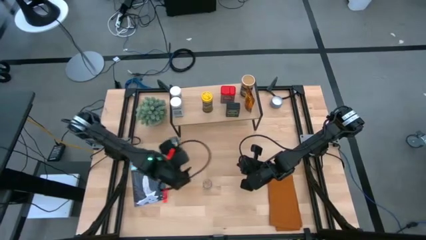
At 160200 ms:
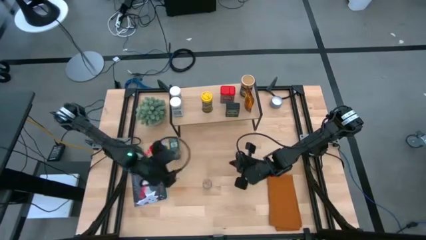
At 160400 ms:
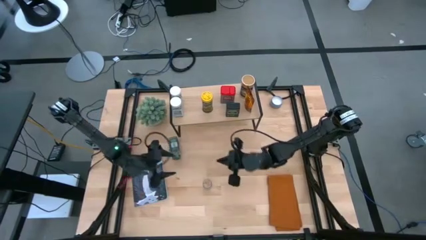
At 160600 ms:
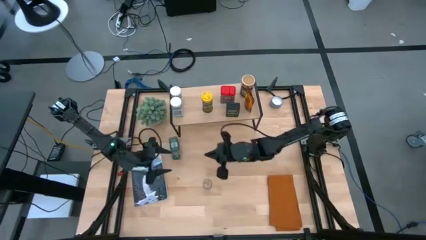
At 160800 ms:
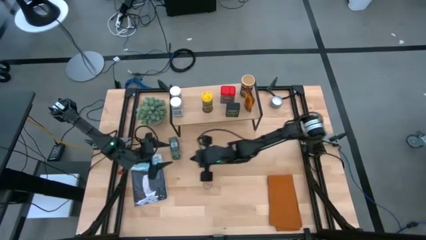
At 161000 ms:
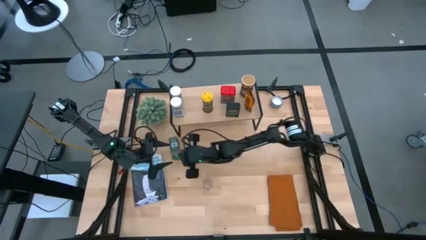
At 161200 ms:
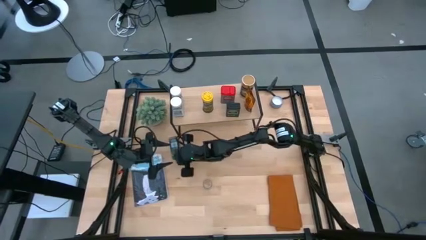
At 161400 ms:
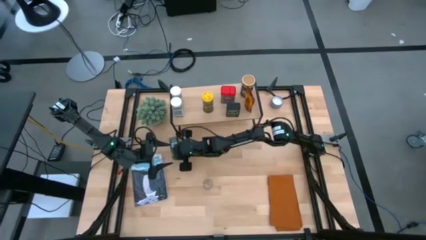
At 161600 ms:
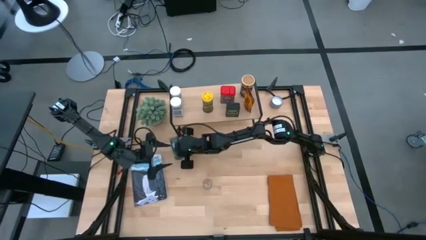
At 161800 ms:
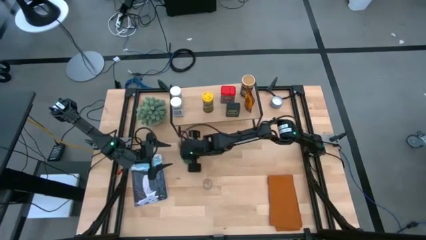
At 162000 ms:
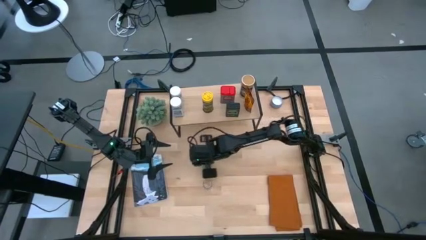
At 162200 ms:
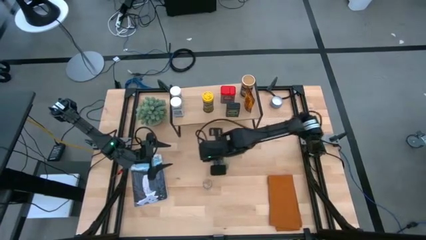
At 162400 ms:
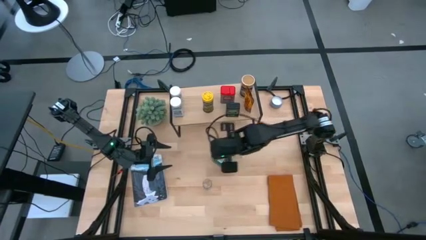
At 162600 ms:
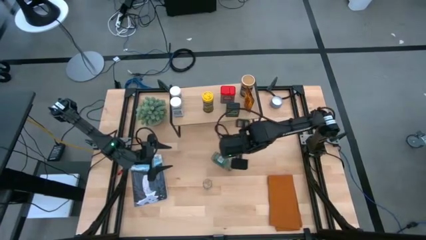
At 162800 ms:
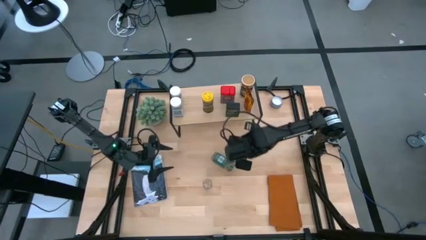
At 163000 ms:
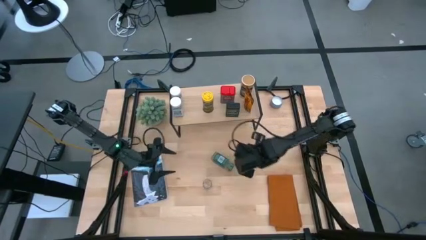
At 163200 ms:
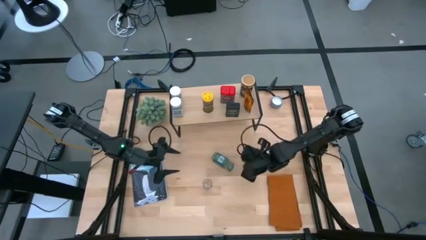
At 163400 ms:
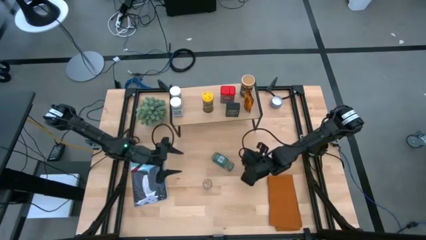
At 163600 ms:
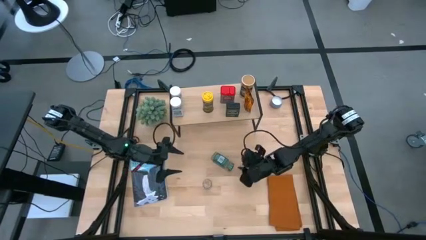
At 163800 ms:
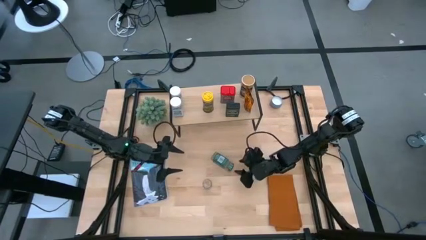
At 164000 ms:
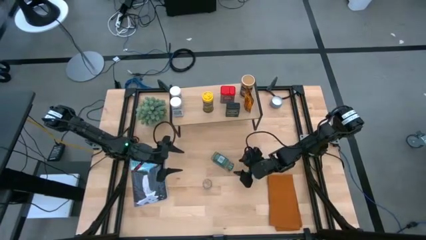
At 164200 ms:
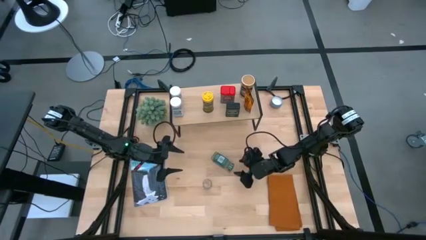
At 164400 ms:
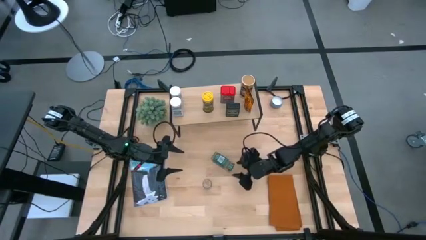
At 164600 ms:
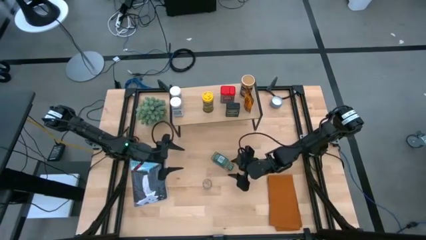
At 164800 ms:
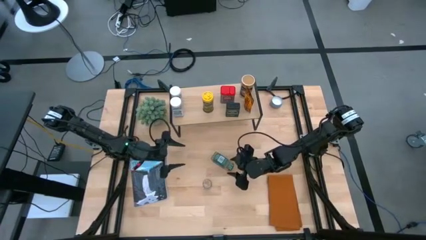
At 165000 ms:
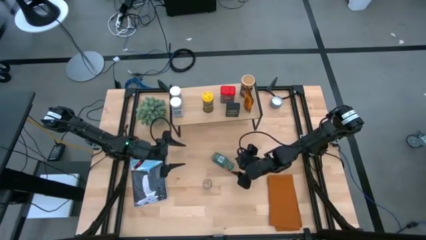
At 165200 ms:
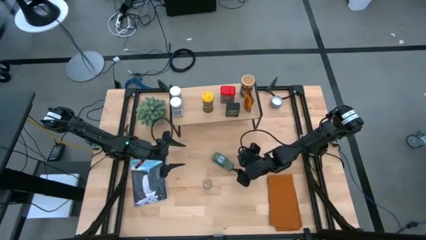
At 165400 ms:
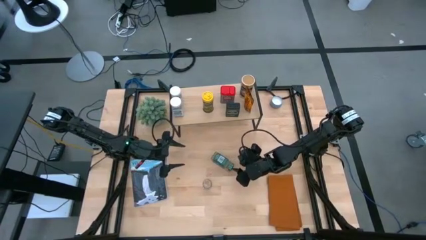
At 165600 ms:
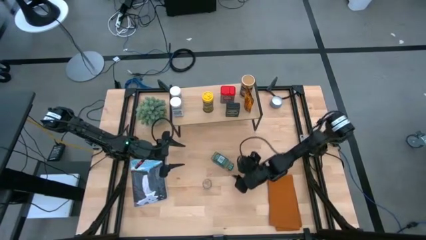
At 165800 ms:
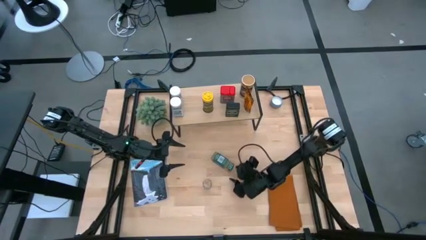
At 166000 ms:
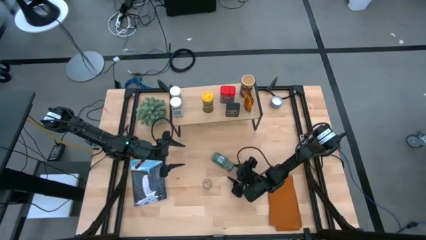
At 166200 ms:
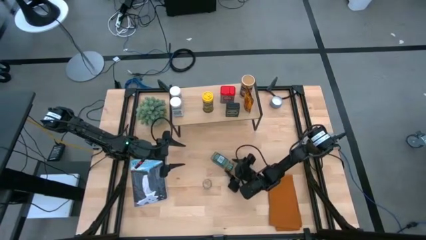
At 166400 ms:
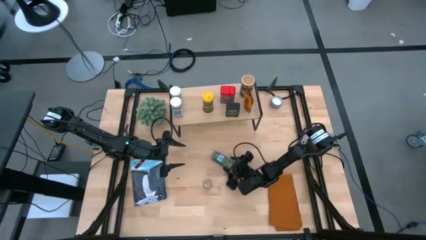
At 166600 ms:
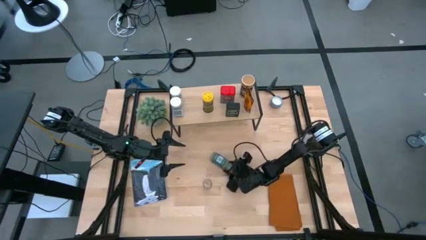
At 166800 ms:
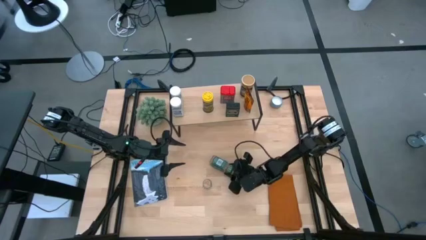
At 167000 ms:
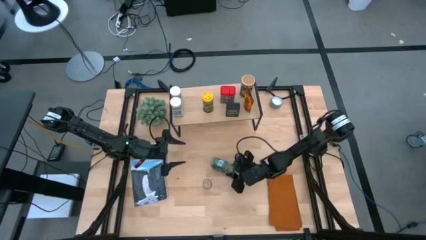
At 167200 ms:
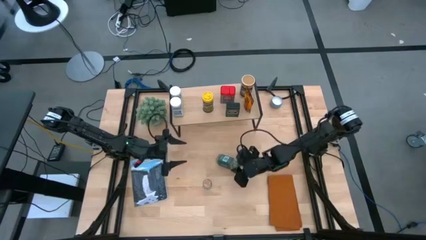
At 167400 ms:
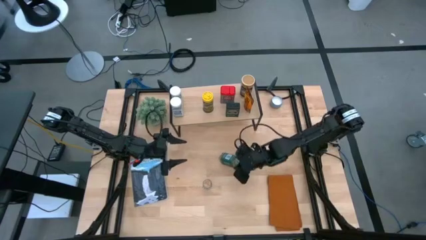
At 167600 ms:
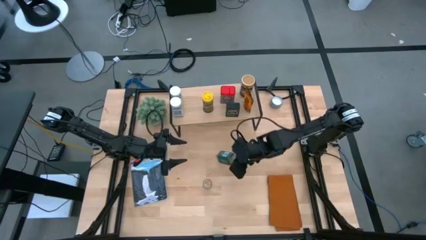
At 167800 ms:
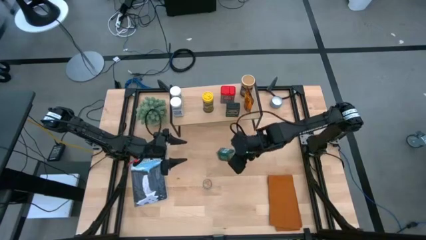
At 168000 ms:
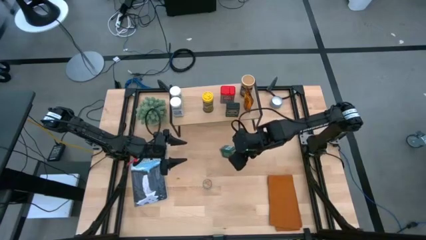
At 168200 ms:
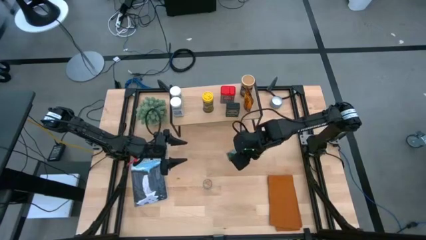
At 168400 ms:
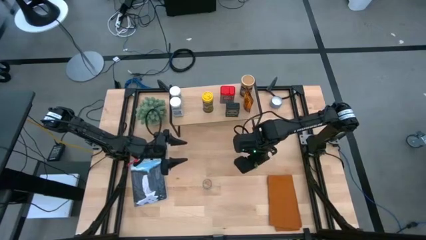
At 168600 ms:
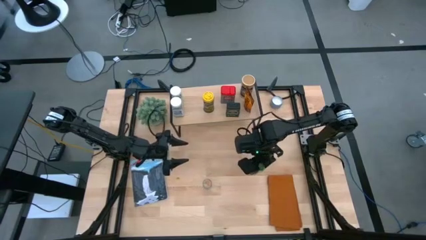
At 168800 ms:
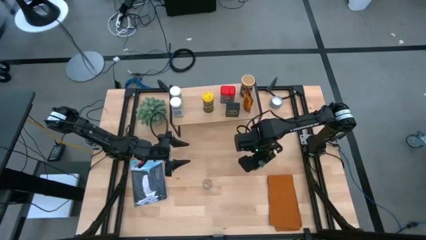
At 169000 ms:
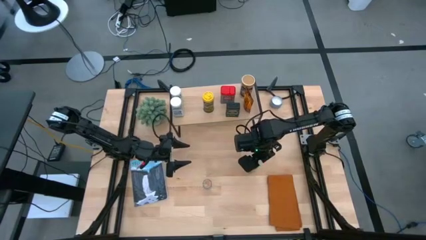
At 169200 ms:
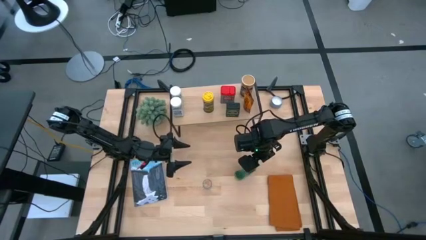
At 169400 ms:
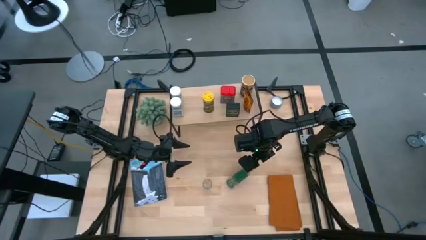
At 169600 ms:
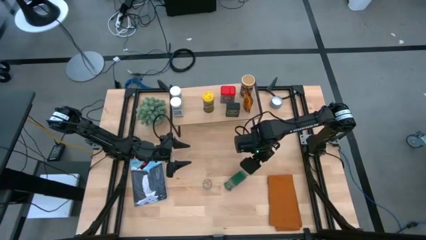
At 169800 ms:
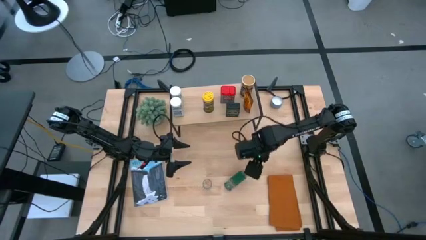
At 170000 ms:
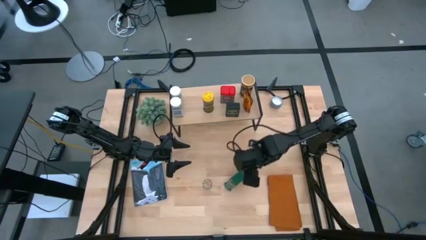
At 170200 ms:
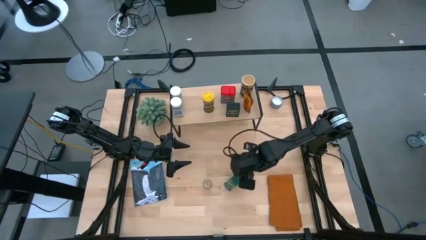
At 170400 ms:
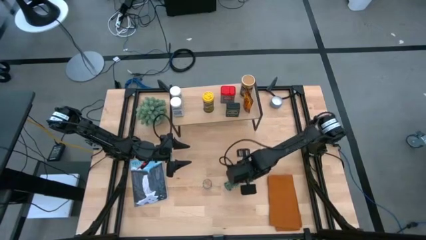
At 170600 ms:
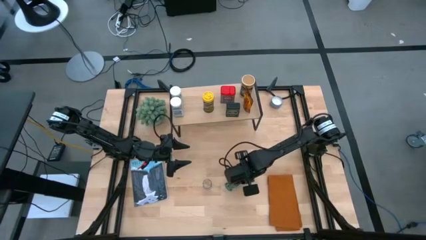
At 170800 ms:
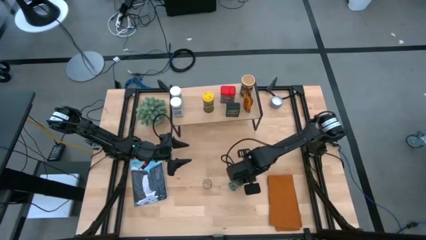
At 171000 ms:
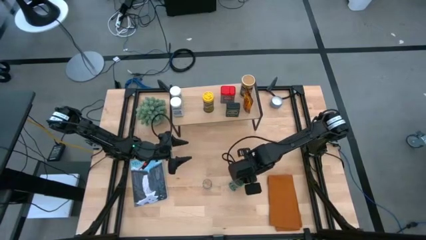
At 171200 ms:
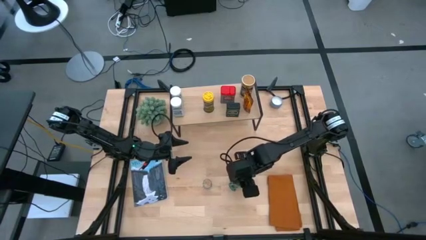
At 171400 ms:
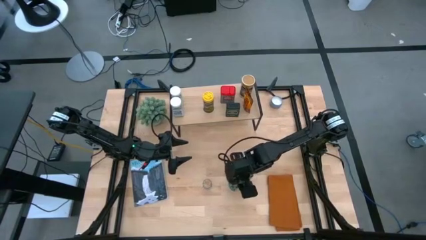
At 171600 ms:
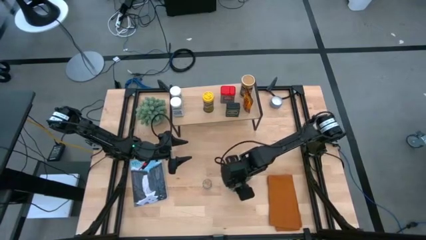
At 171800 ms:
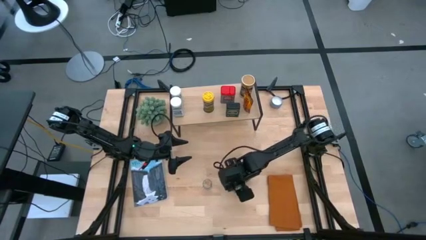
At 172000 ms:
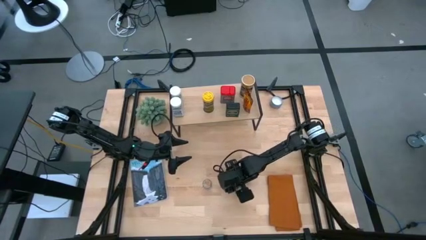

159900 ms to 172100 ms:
Task: Shelf spices
Put the green seasoning bottle on the shelf

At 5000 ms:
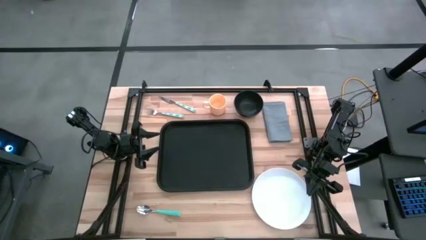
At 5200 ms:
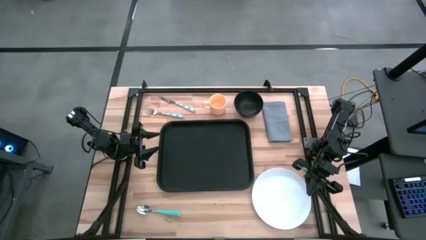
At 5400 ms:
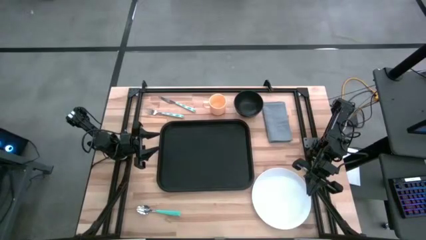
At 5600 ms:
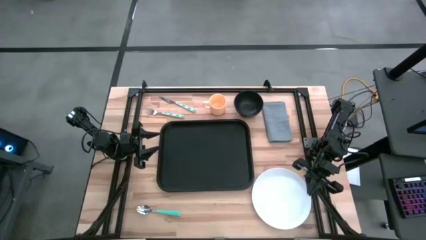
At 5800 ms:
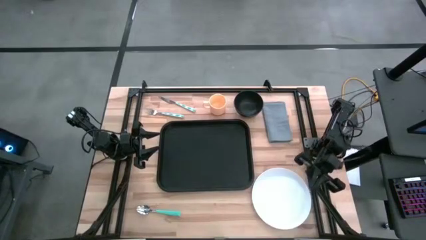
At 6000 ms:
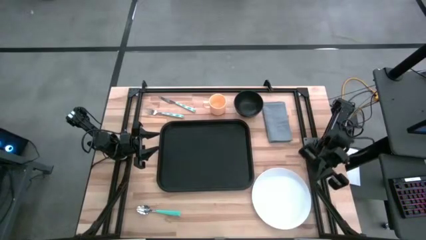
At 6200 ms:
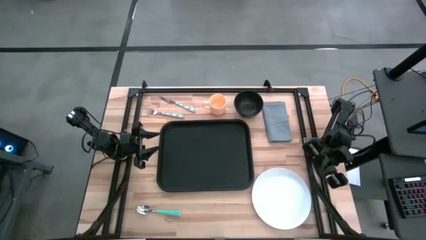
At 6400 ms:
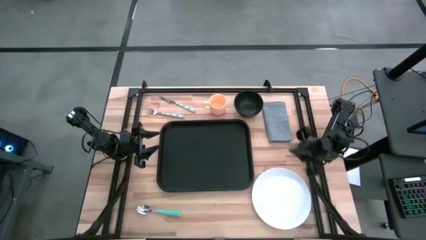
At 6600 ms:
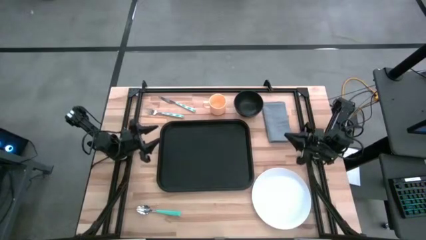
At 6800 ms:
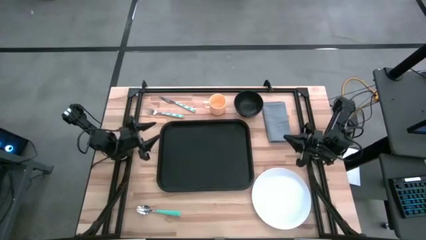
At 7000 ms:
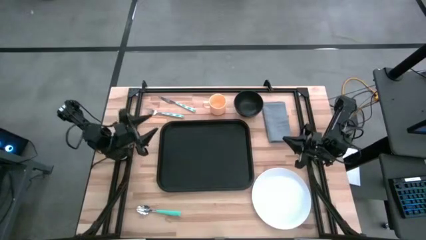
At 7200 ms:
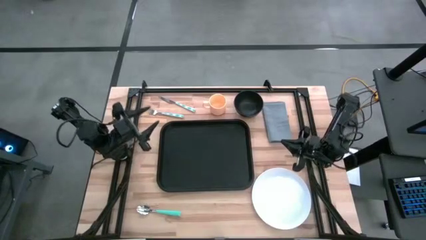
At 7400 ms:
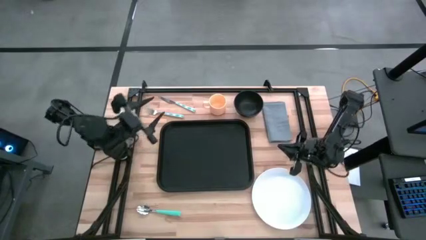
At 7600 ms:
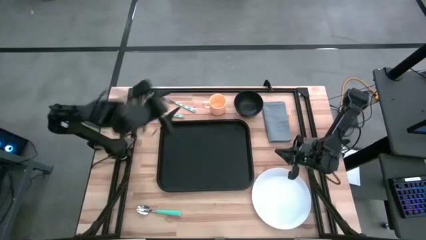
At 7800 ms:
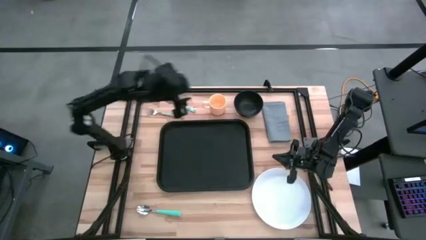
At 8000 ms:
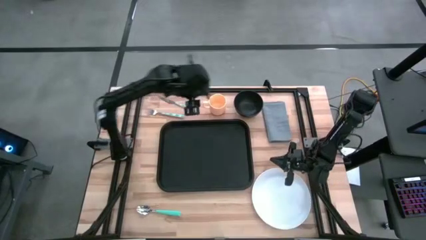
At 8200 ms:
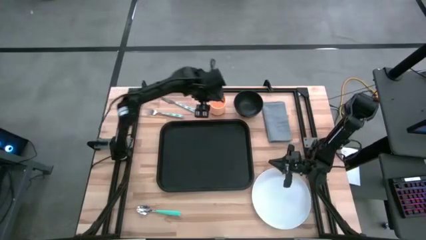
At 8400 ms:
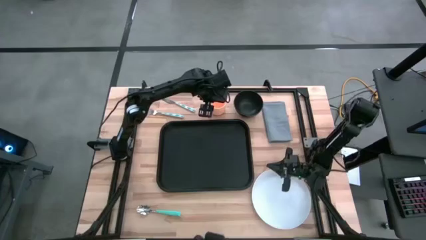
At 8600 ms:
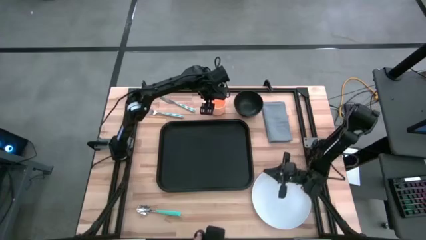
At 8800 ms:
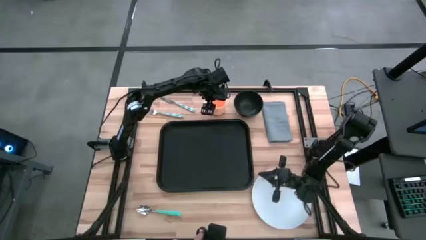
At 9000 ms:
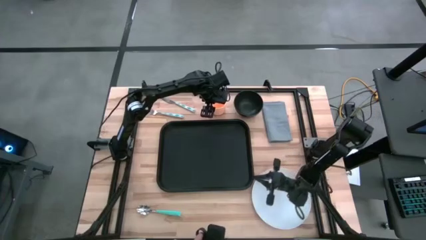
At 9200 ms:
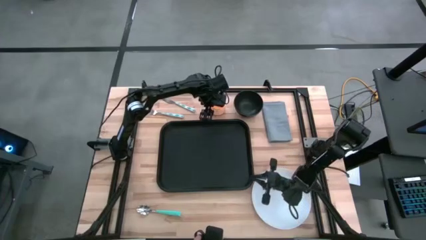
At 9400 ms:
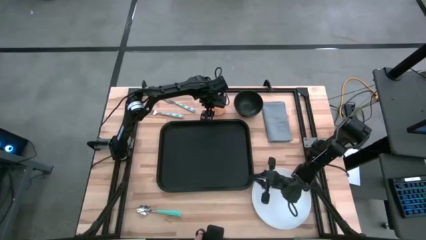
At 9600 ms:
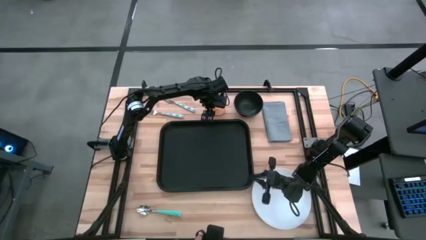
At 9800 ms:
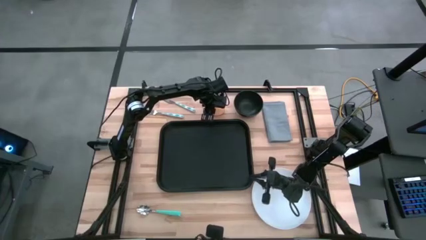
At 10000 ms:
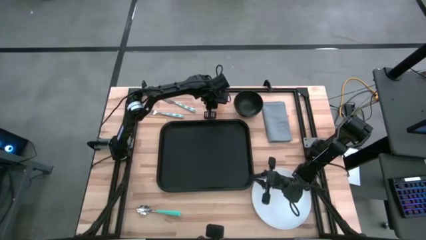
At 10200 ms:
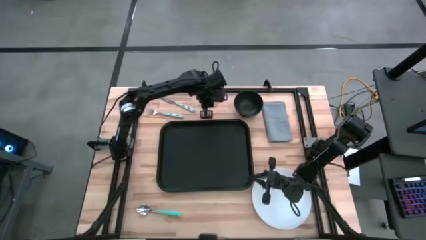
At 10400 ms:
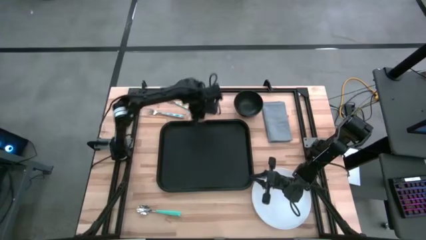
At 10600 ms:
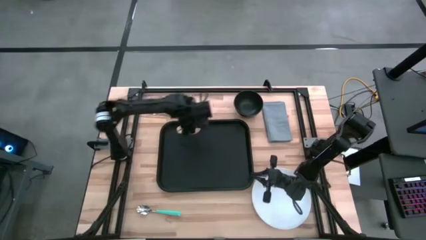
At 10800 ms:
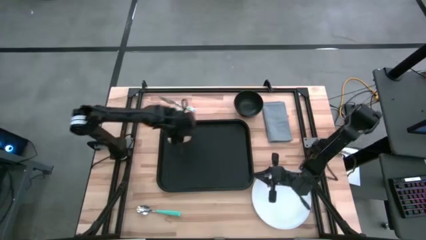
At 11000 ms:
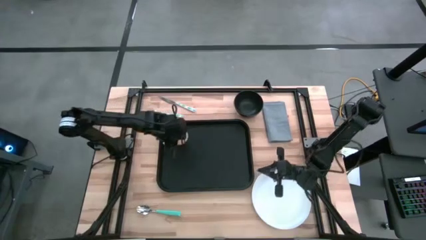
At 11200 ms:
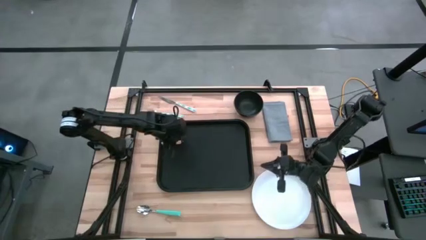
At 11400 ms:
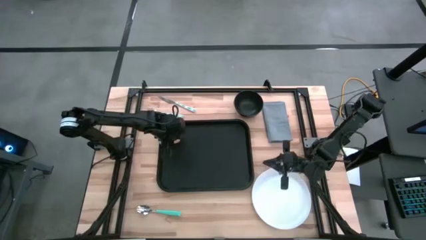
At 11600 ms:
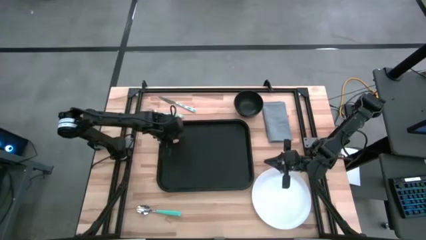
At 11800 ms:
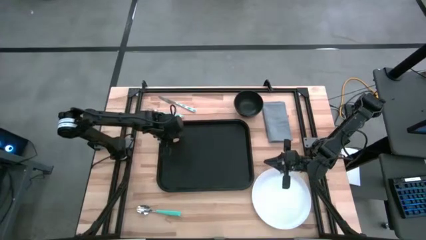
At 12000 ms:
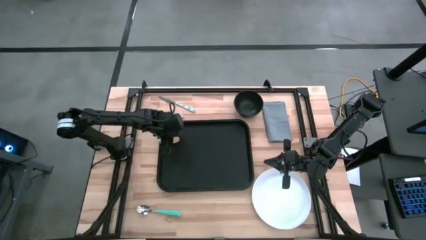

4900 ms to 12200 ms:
Task: Set up tray
Put the yellow mug on the top left of the black serving tray
